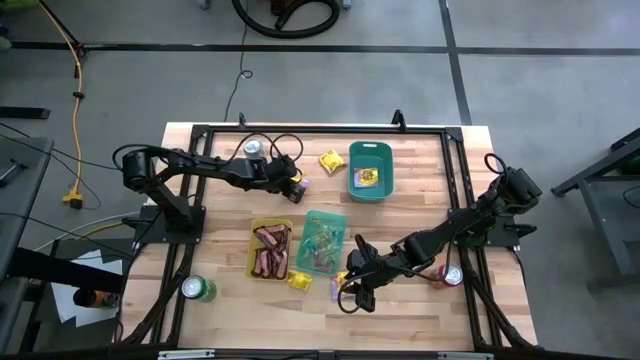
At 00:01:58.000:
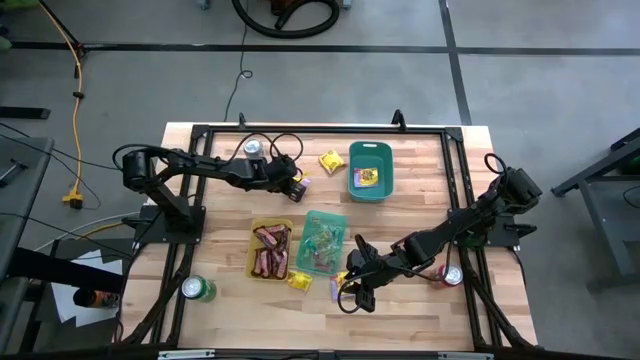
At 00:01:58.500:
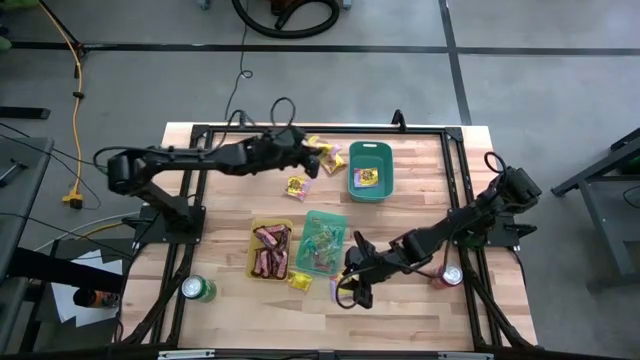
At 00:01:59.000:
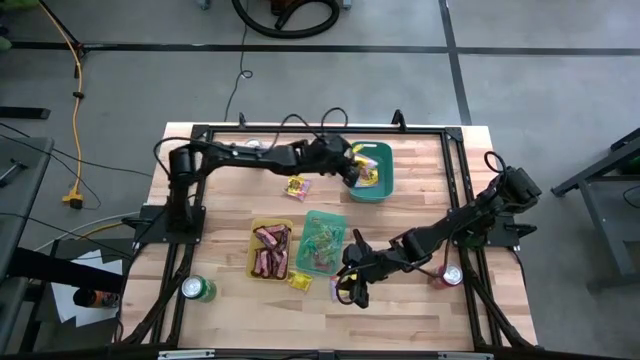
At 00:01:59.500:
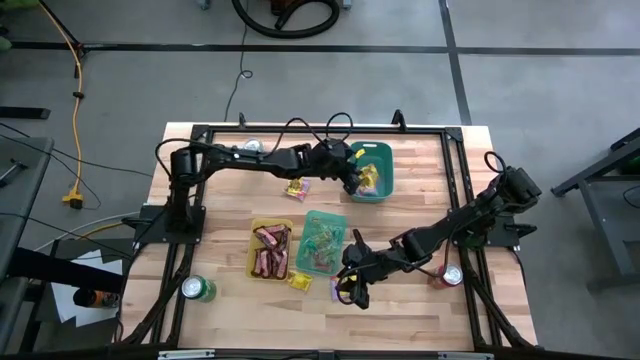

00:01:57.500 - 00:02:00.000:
Task: Sort candy
Put the yellow candy into the blue bin

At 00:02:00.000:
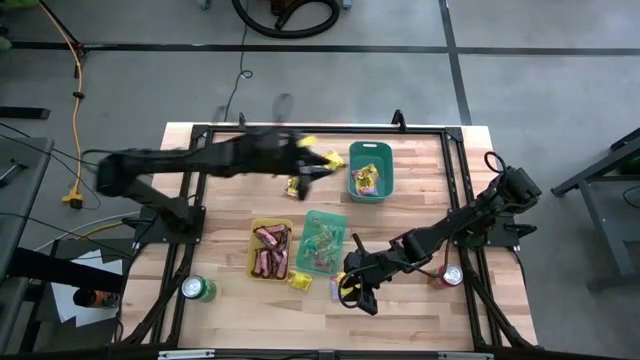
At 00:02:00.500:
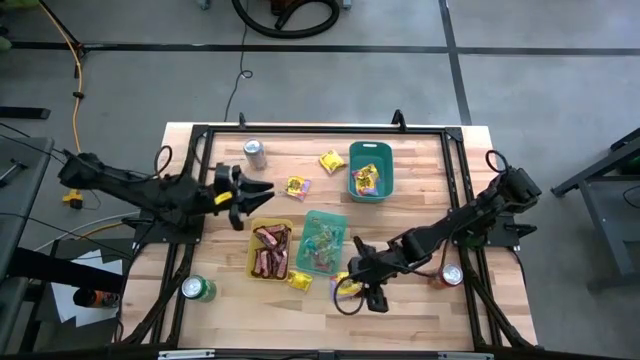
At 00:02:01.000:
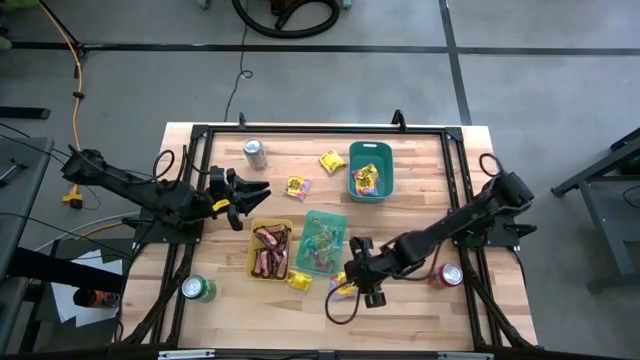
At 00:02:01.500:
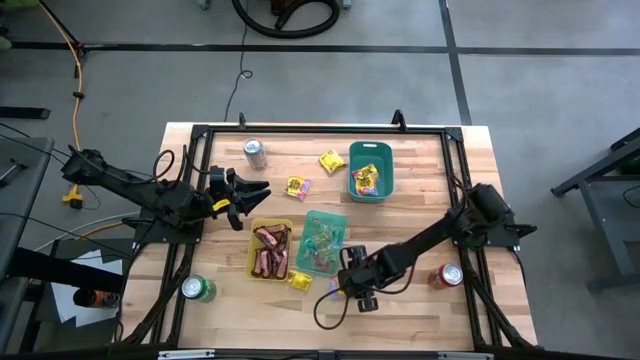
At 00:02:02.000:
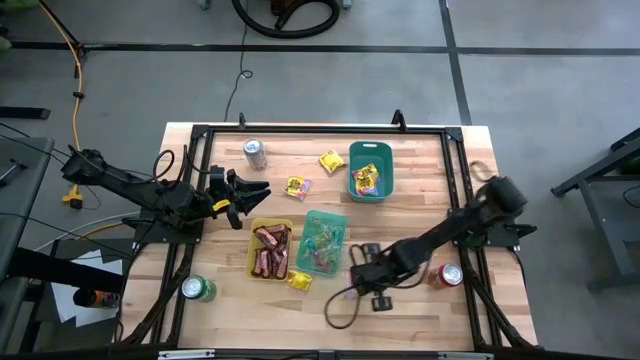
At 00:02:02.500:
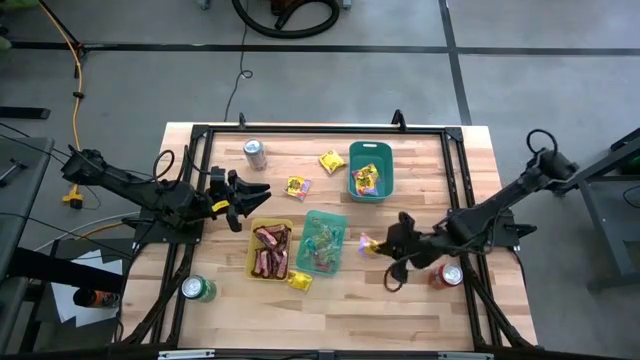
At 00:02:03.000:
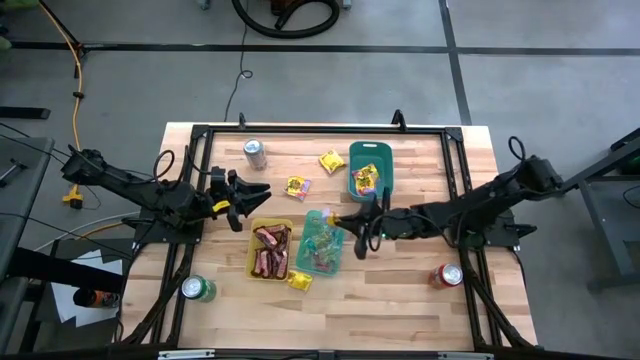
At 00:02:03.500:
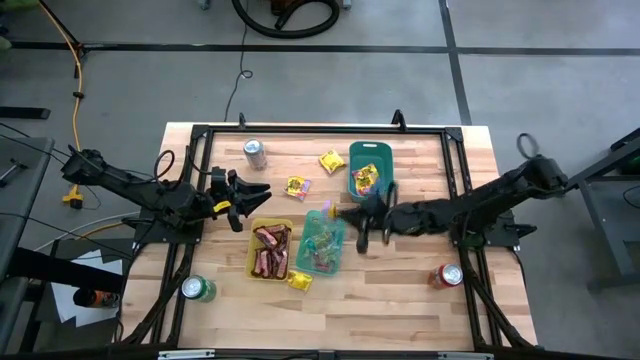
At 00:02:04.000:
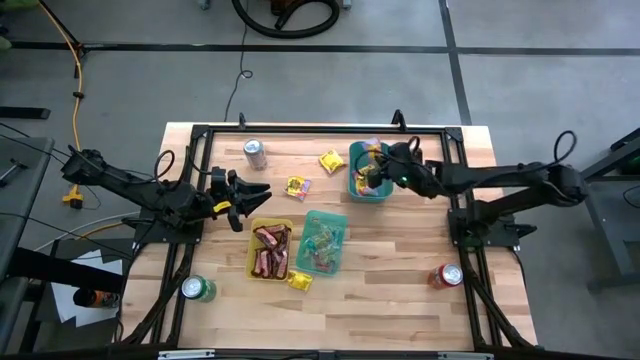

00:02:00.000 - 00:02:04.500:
Put the yellow candy into the blue bin

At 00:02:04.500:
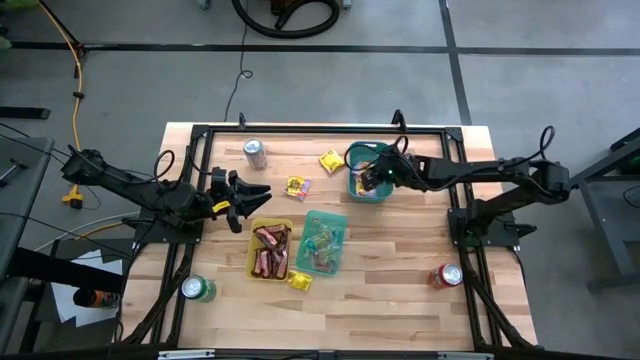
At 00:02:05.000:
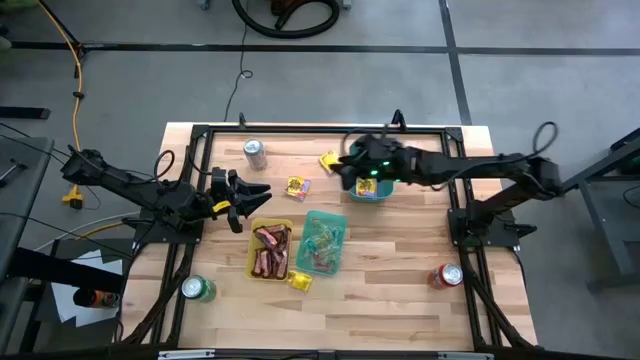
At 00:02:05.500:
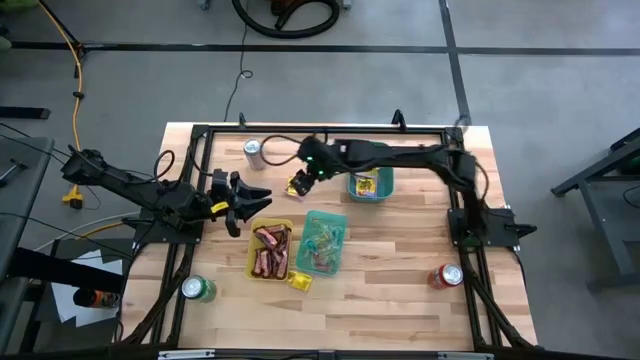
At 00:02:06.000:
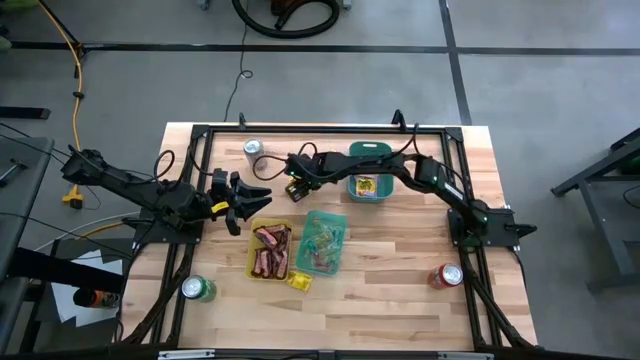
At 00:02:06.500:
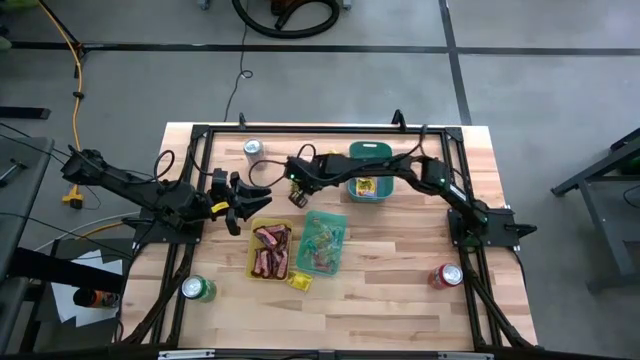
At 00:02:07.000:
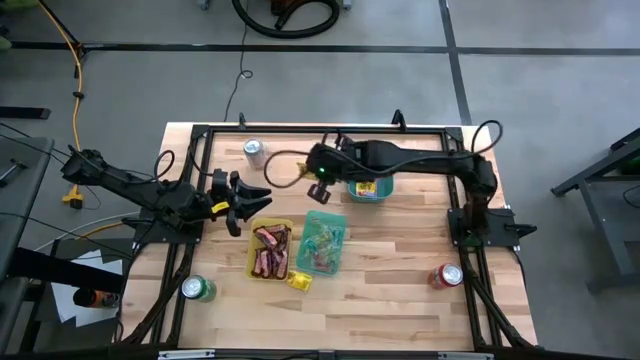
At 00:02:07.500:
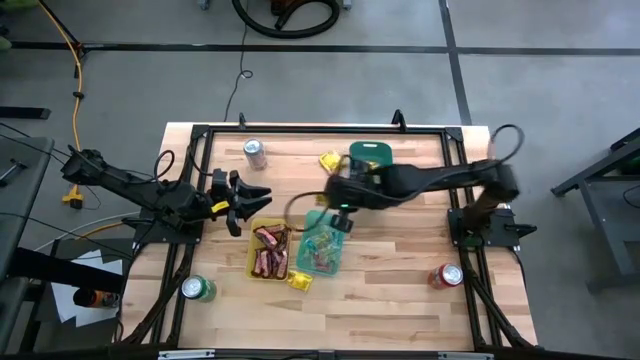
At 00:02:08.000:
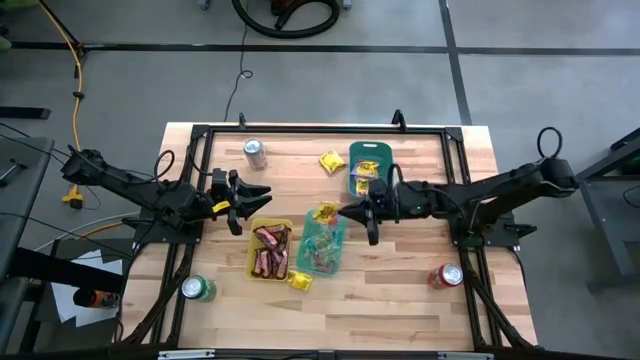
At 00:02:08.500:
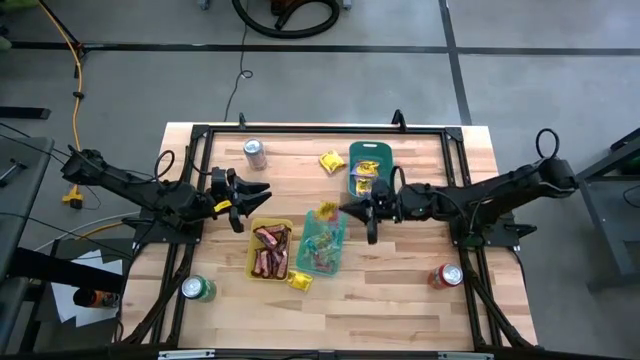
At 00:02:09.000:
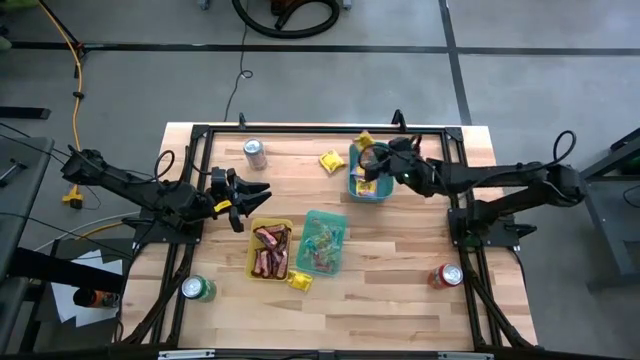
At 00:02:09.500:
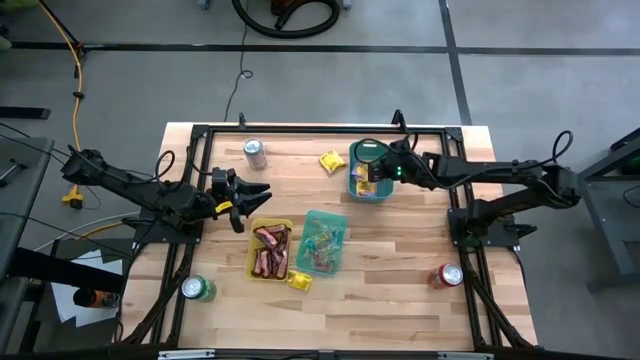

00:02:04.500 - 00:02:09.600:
Put the yellow candy into the blue bin

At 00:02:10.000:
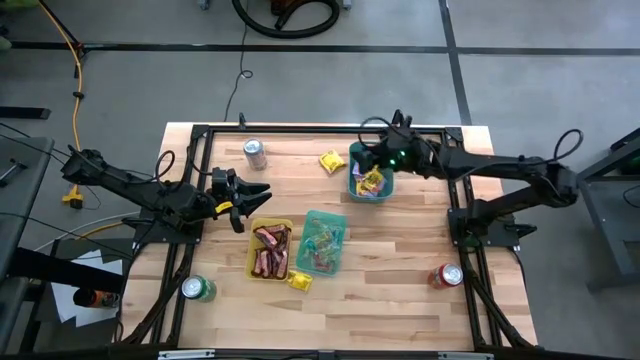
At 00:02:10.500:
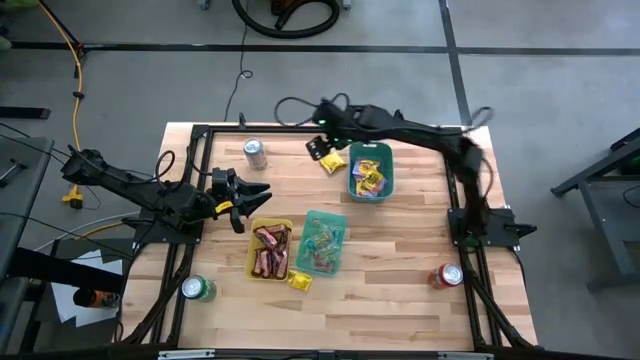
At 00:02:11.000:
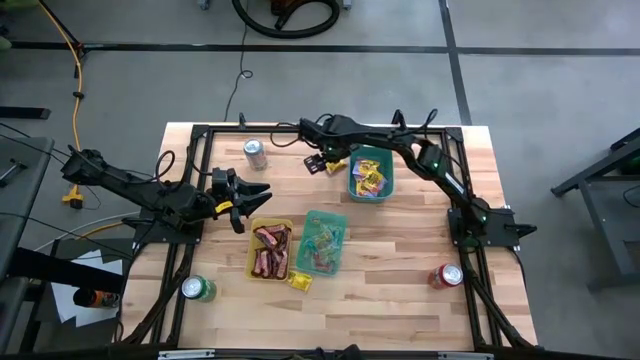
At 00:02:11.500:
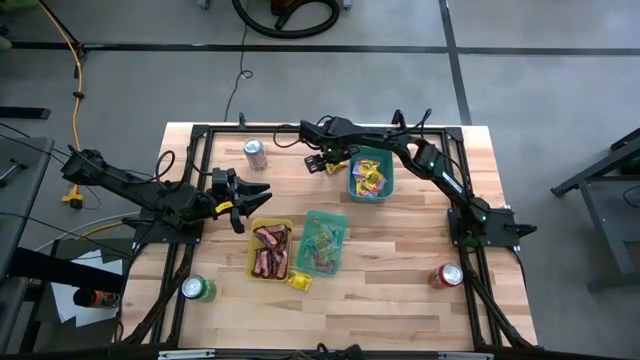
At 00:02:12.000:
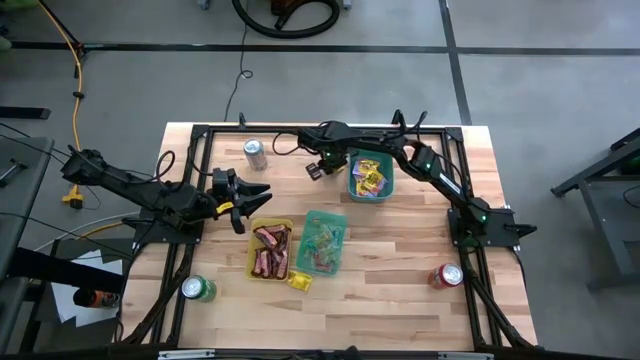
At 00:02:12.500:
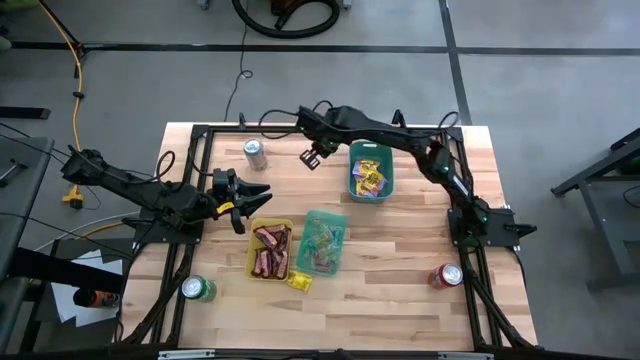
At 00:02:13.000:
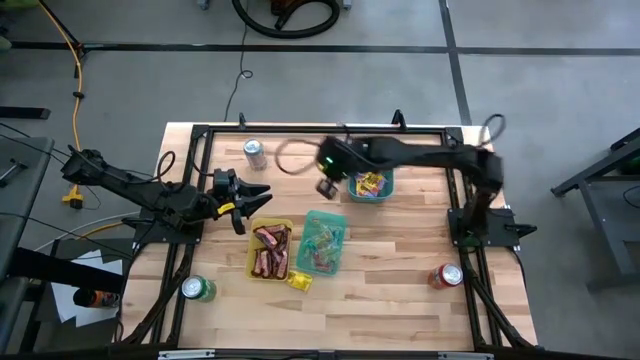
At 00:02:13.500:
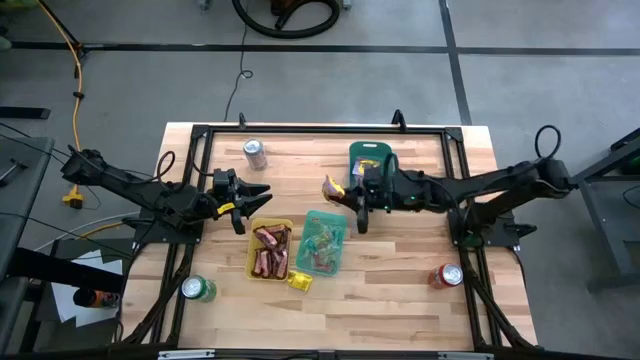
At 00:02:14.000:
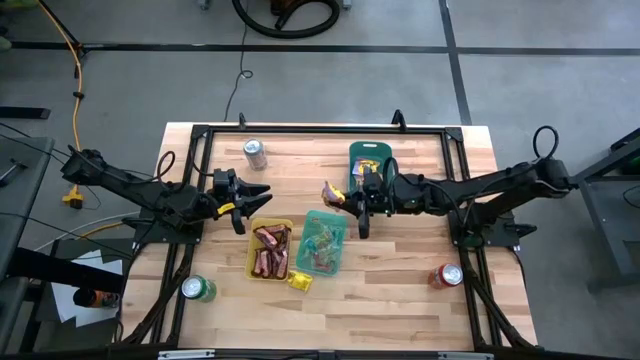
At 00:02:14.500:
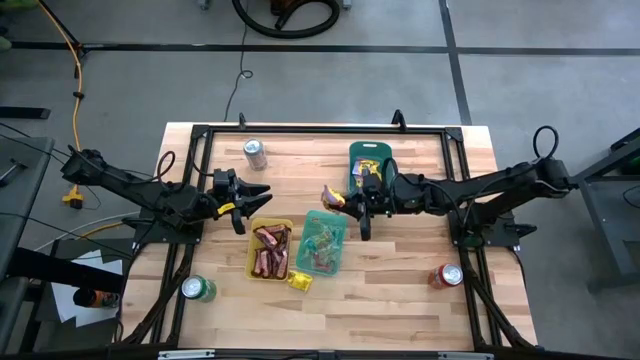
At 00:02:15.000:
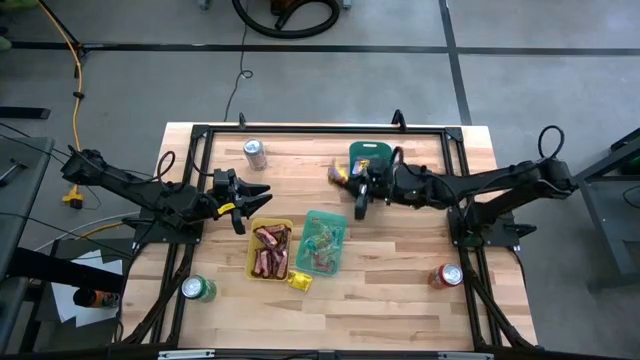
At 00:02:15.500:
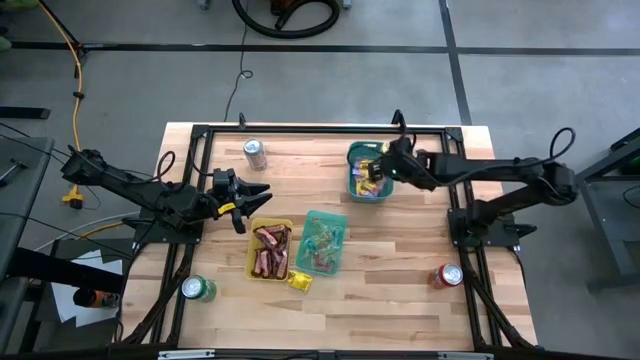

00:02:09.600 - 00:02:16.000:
Put the yellow candy into the blue bin

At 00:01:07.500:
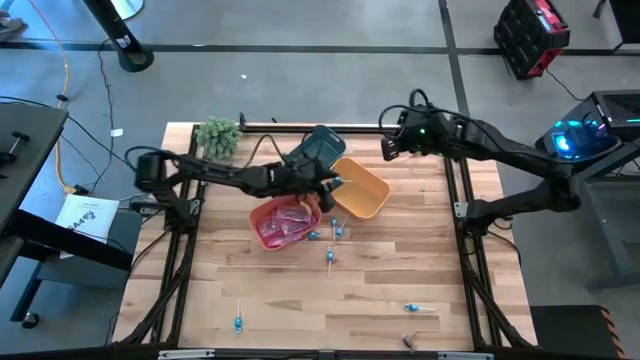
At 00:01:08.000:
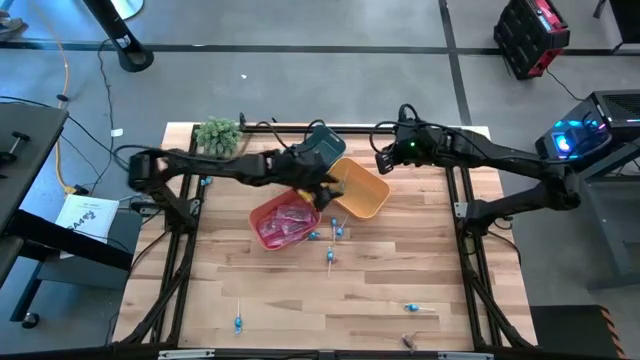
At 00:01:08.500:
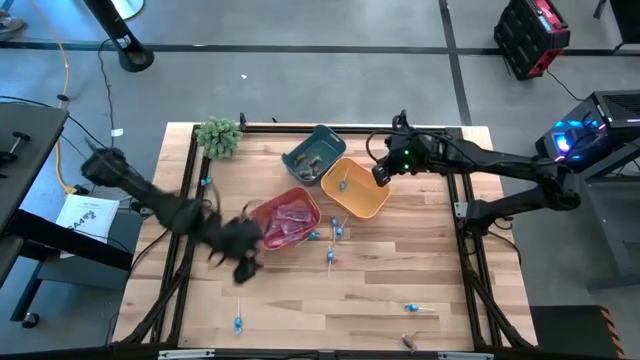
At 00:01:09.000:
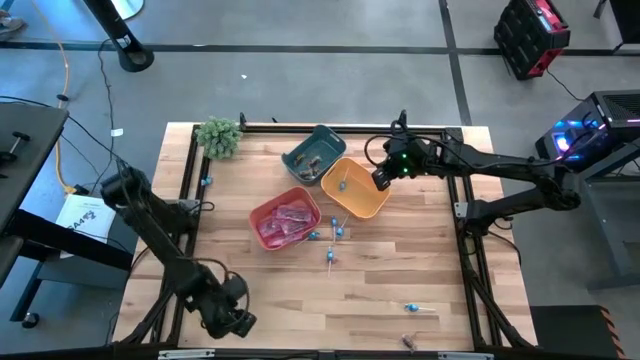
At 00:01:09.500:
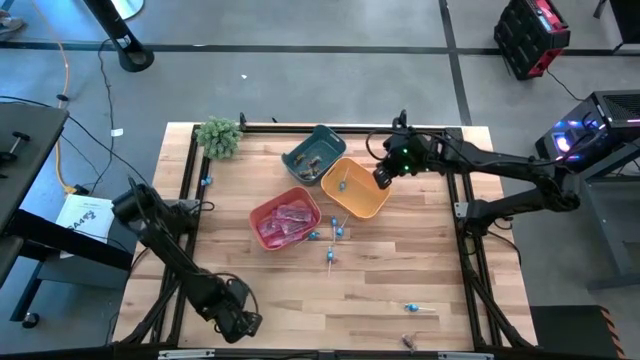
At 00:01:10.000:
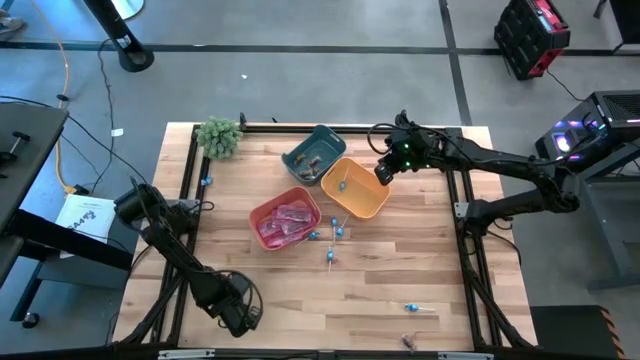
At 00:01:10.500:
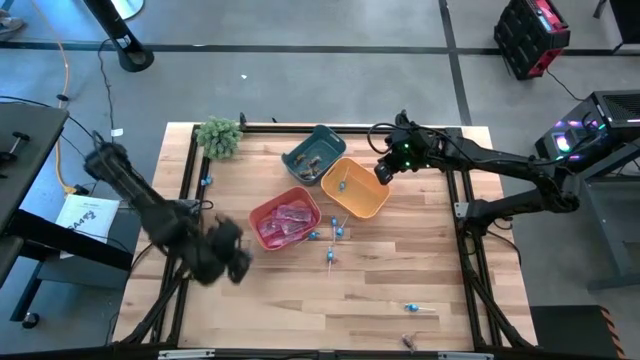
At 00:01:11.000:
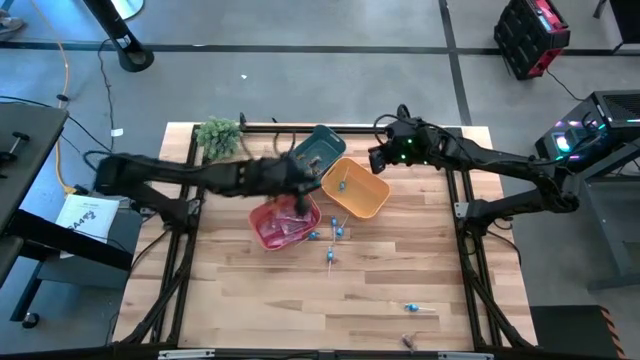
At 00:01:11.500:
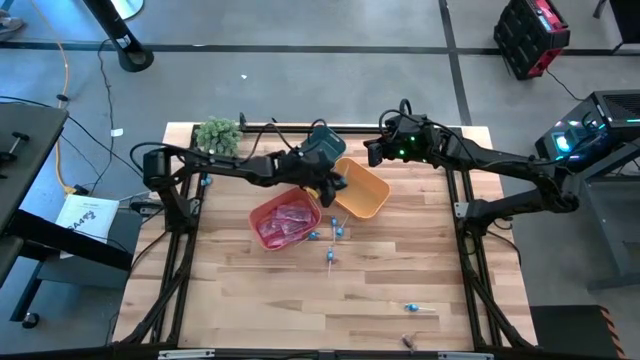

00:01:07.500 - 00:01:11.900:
Task: Sort candy
Put the blue candy into the yellow bin
